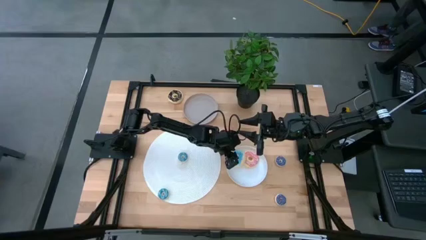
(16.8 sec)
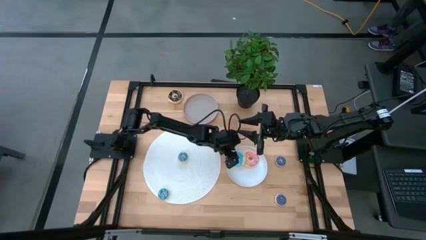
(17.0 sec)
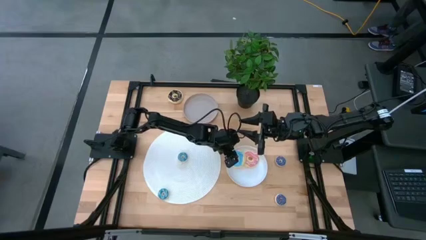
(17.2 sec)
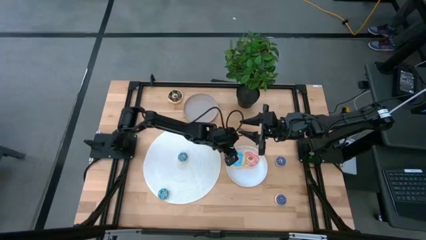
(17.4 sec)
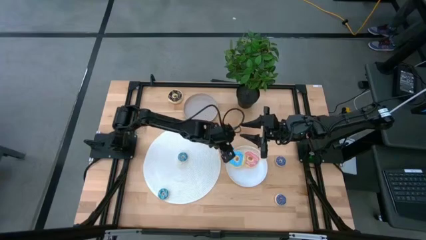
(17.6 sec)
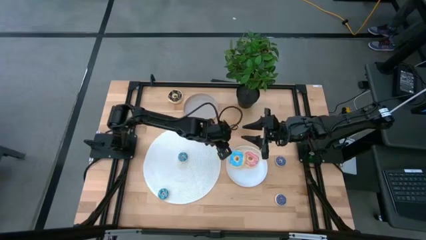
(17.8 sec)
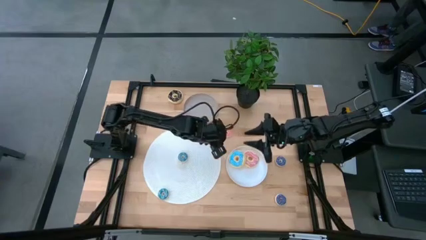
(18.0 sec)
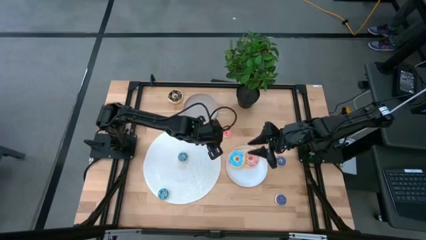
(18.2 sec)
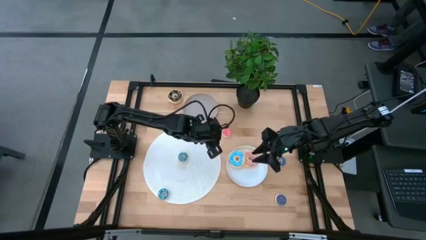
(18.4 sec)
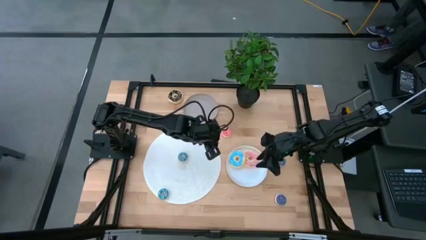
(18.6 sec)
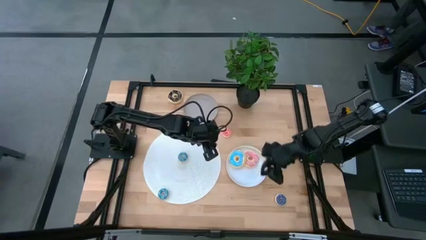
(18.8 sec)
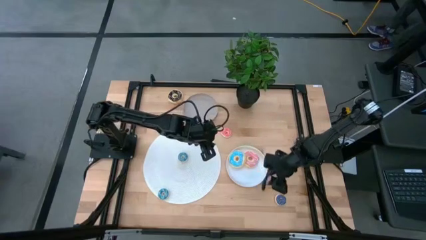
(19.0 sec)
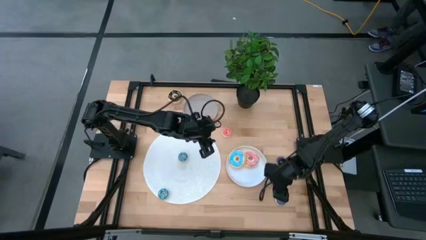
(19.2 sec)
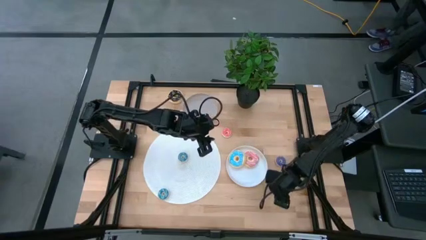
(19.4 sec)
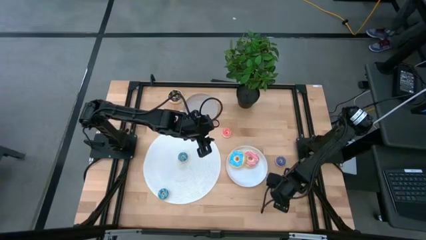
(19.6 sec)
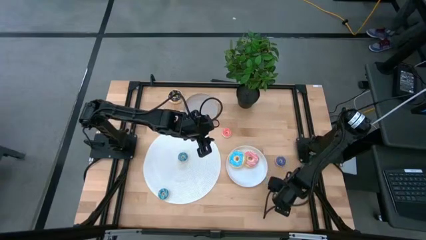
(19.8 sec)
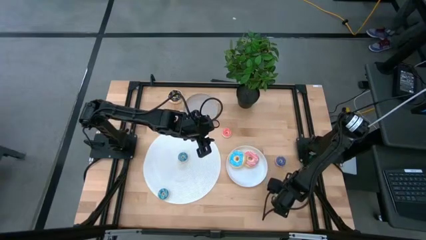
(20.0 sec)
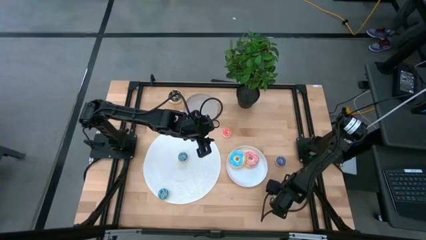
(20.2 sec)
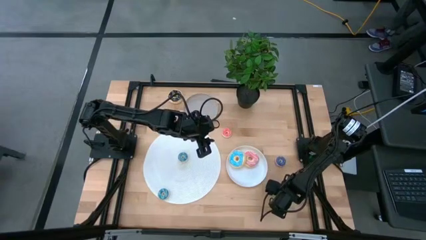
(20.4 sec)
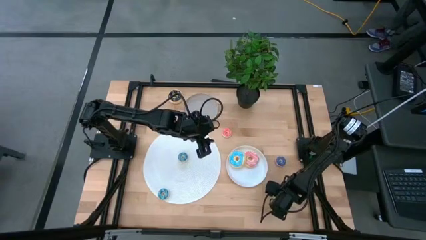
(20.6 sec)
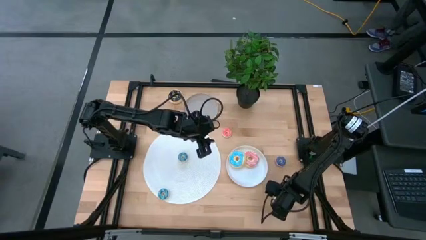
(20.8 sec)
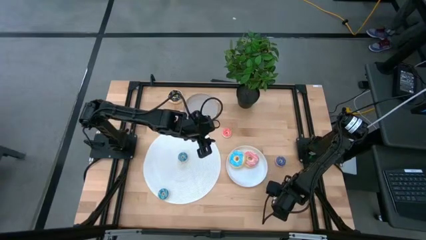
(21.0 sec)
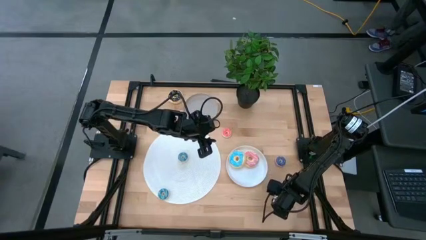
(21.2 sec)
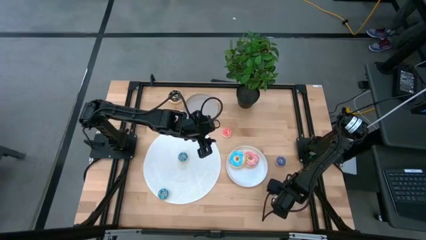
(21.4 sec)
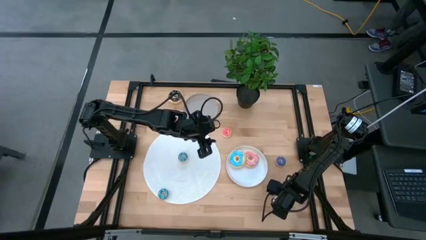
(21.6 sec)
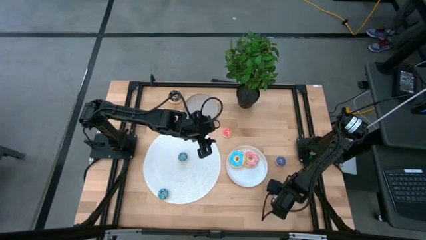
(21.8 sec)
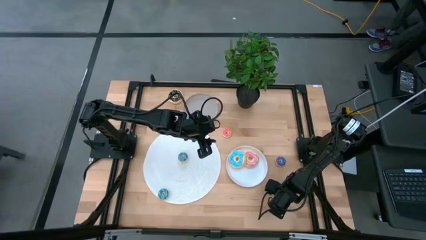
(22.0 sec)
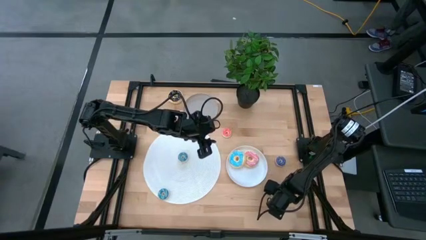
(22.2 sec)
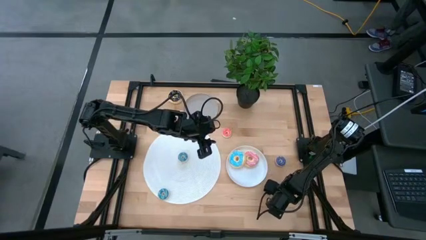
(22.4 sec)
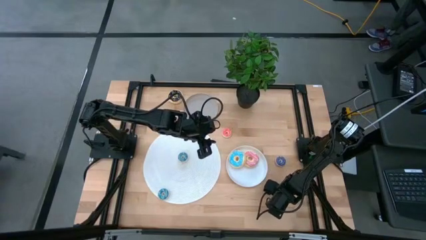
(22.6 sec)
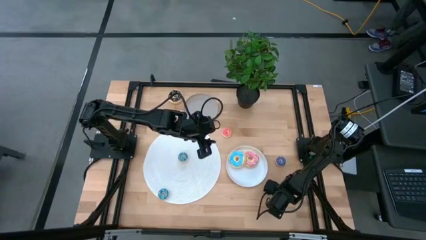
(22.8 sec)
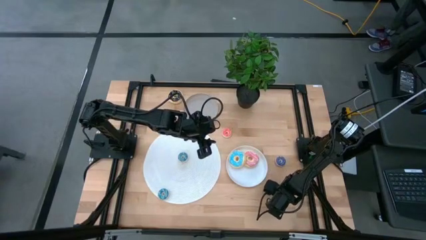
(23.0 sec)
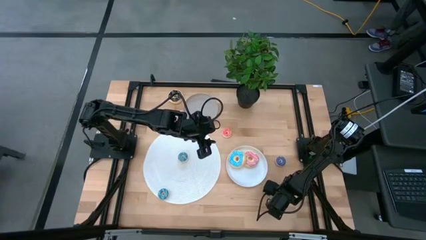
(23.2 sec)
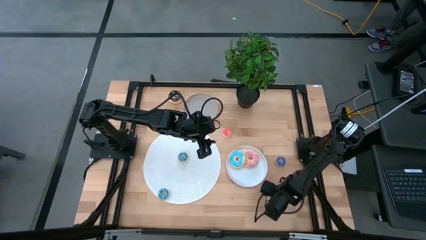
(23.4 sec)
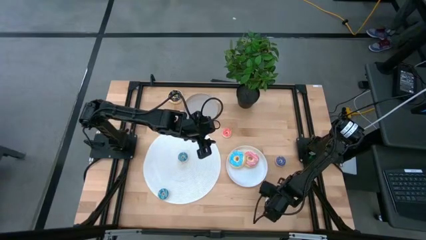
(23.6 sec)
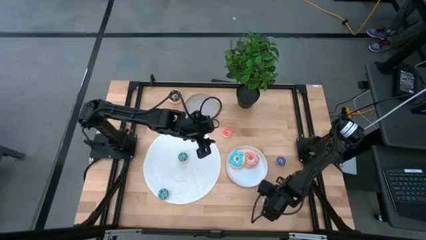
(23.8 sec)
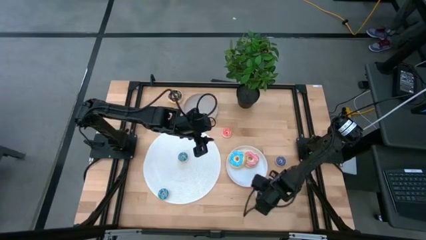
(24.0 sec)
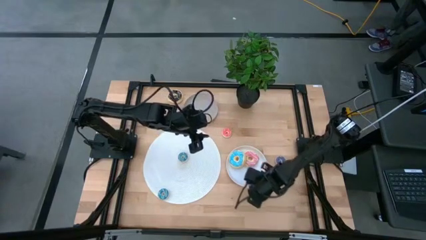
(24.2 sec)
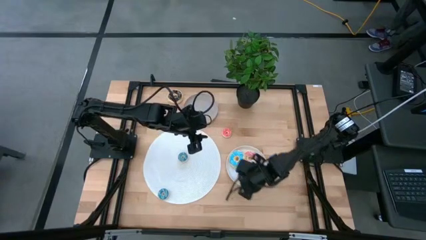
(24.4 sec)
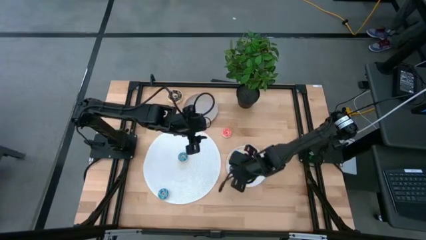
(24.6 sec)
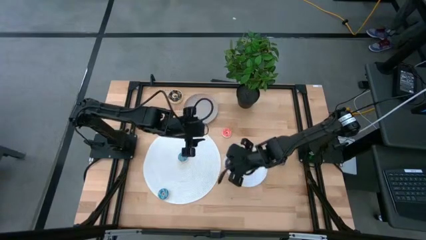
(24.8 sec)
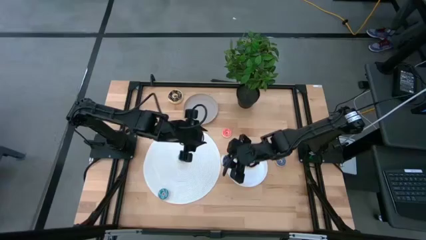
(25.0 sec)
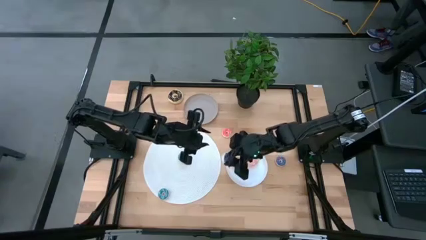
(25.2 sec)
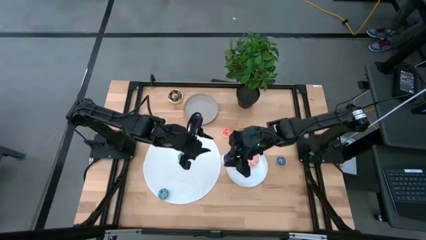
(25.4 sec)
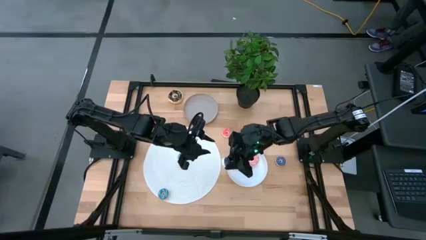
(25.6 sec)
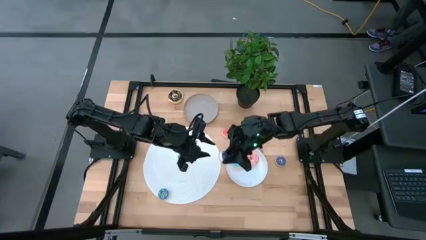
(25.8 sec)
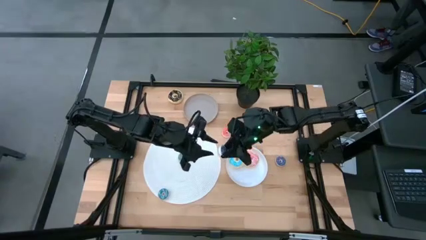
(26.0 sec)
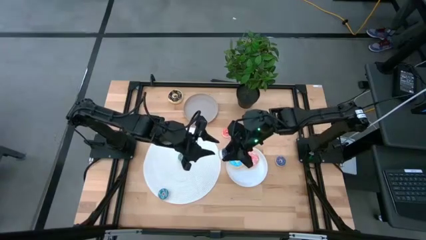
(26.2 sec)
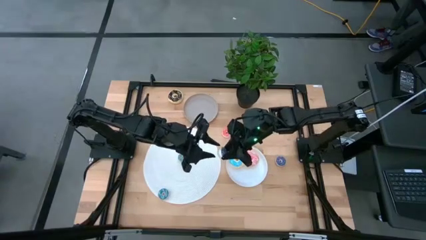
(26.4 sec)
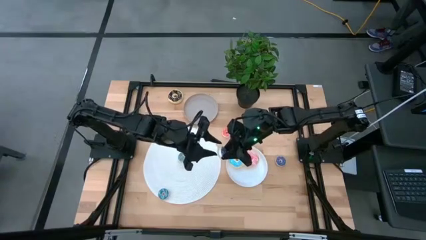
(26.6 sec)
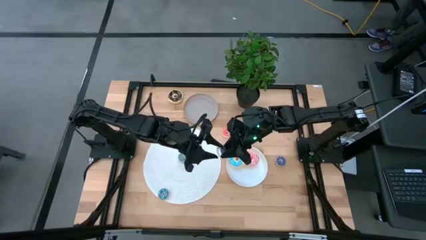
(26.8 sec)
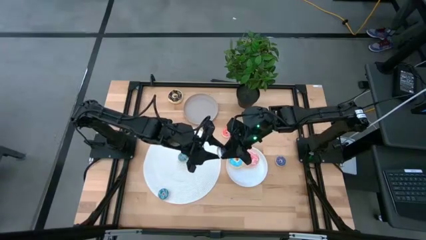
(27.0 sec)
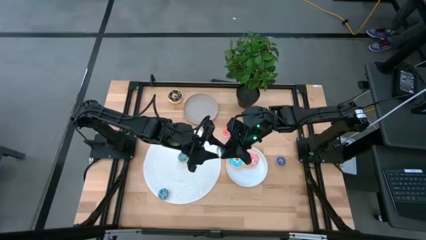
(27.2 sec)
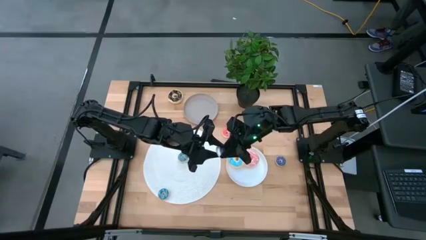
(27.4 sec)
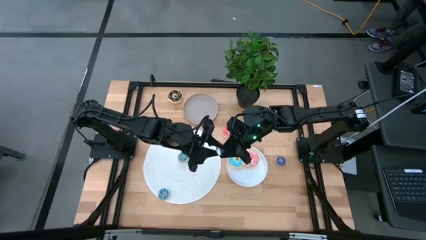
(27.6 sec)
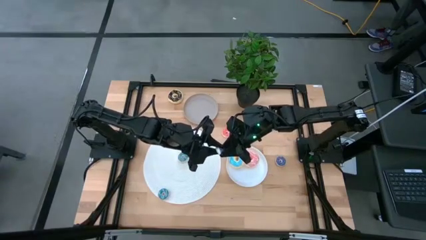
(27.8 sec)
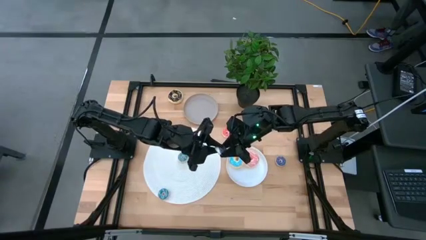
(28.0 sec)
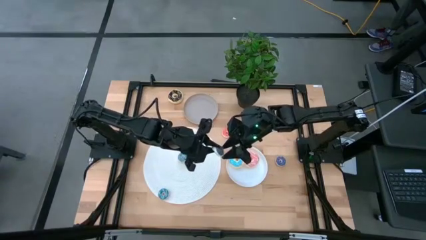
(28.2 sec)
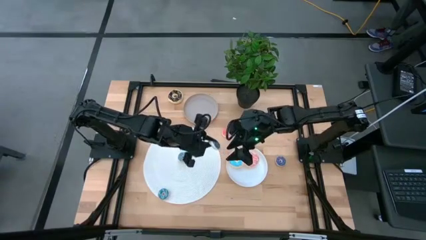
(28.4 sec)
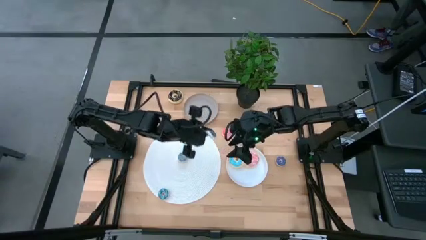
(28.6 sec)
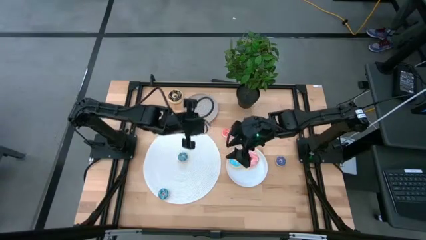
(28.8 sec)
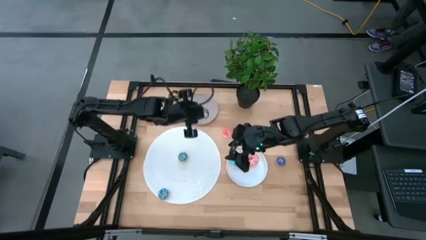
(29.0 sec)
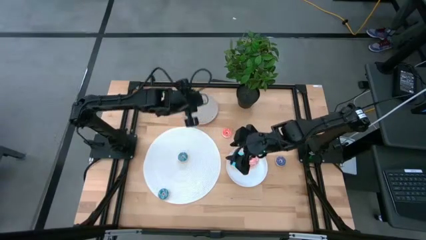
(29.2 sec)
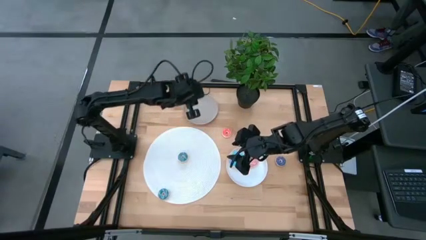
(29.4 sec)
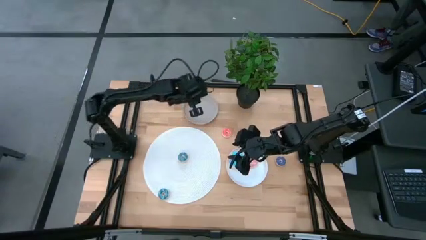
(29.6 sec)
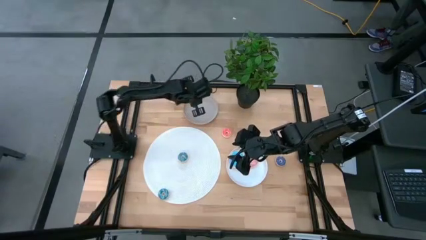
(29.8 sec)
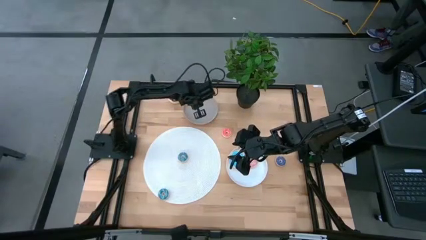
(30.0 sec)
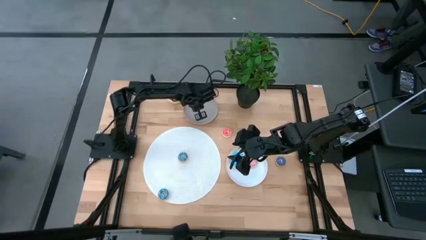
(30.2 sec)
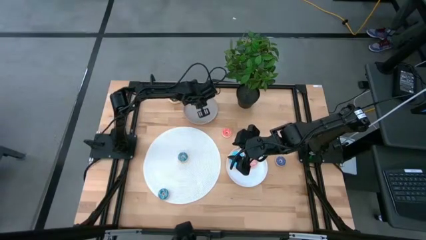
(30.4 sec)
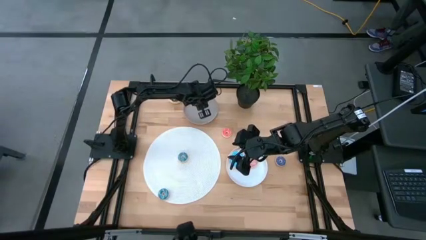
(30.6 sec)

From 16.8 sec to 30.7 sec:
Task: Pick & Place donuts
Put the bottom small purple donut on the brown plate
